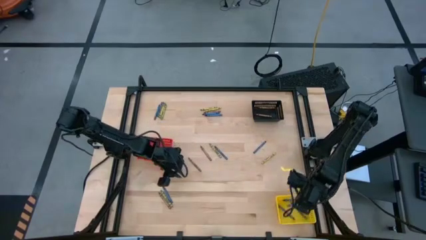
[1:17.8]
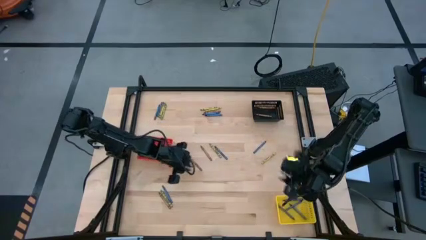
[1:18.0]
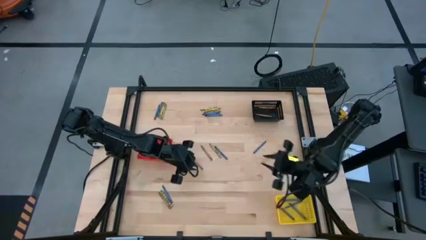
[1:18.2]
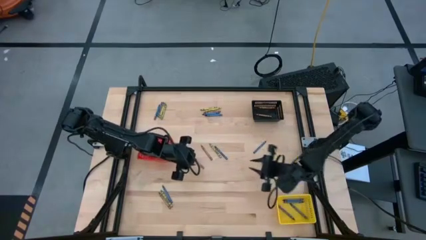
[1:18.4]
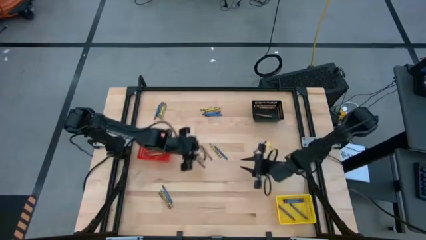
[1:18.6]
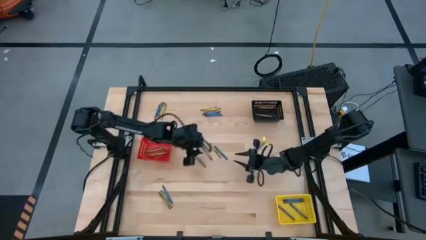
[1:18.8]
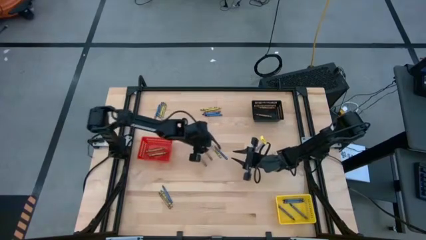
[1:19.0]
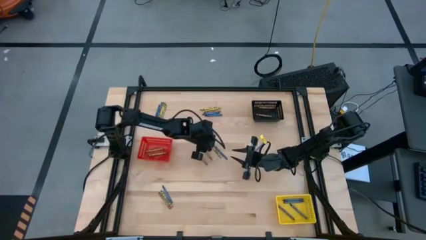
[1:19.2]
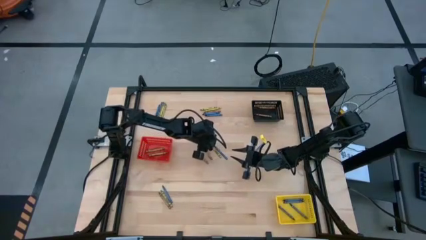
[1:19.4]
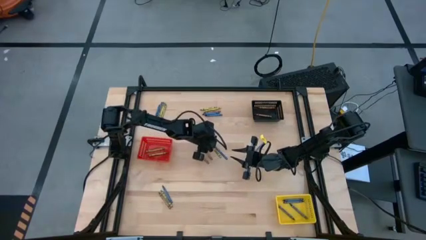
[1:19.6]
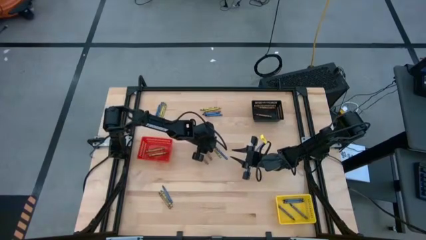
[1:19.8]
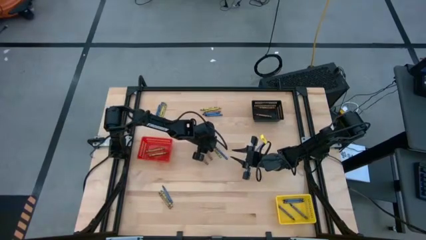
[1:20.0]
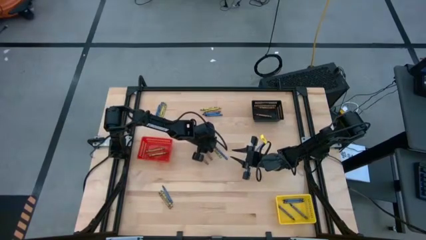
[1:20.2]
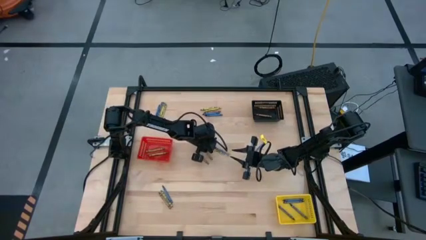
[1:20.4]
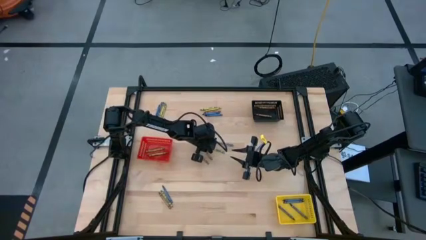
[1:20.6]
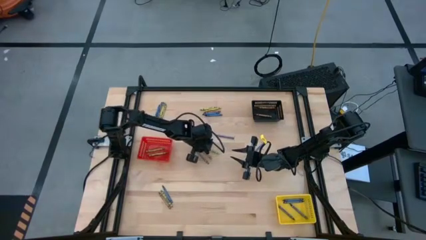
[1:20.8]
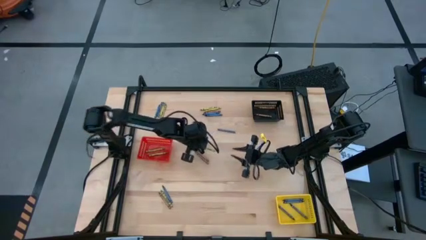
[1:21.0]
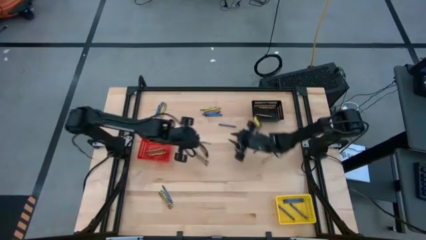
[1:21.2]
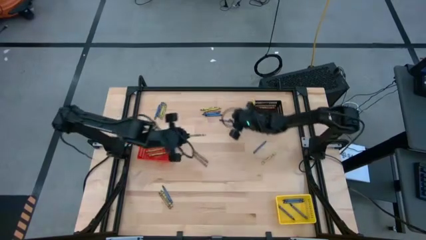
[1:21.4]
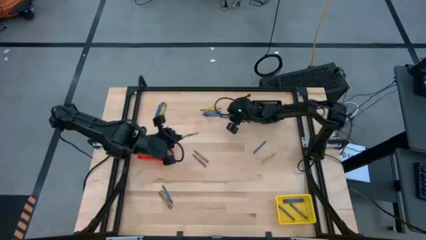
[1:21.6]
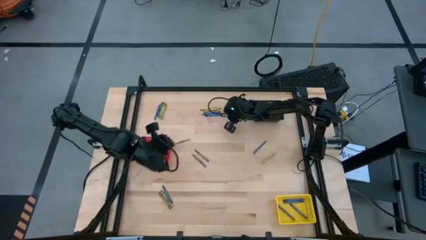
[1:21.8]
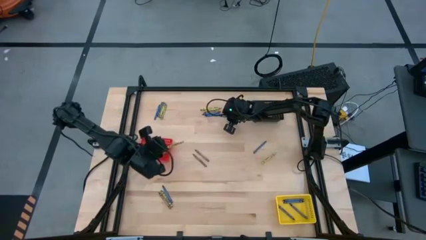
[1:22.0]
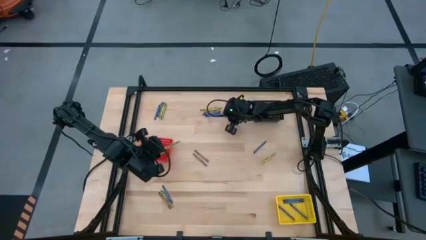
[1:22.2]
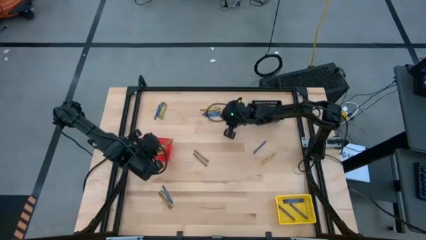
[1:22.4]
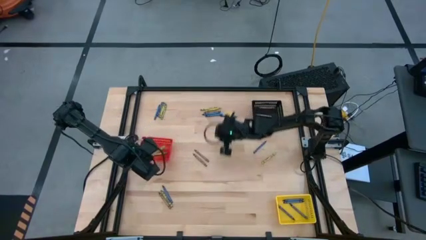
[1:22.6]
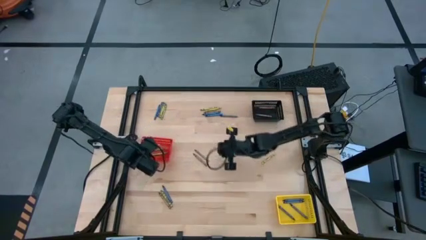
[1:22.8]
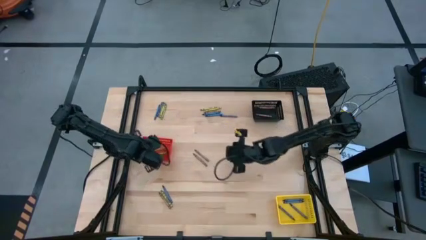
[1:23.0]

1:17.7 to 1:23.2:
Task: Sort crayons
Put the green crayon into the red bin

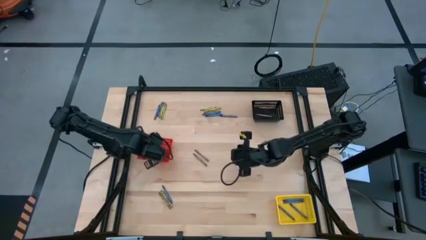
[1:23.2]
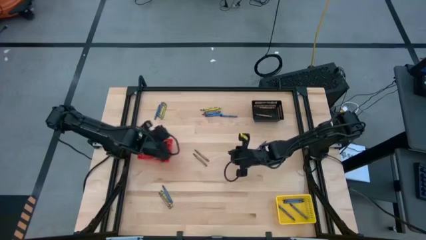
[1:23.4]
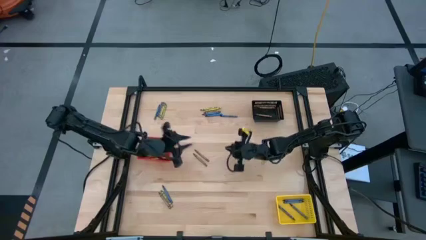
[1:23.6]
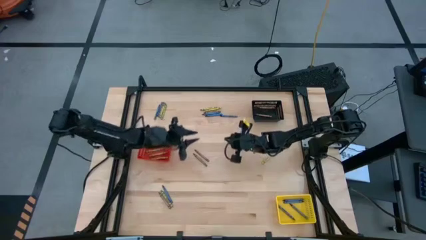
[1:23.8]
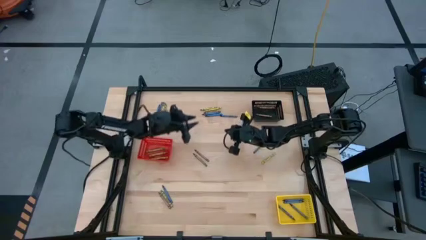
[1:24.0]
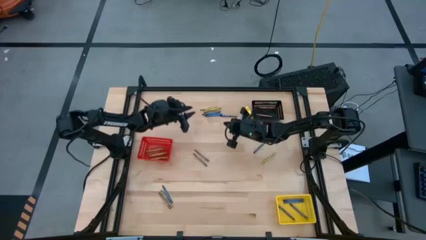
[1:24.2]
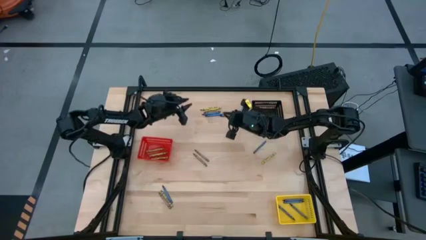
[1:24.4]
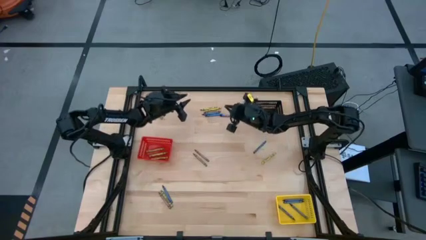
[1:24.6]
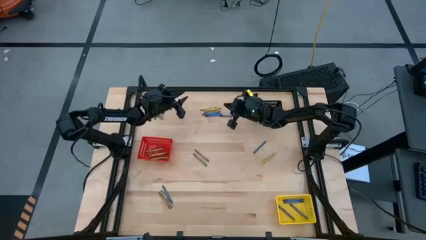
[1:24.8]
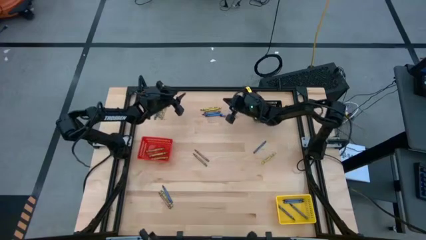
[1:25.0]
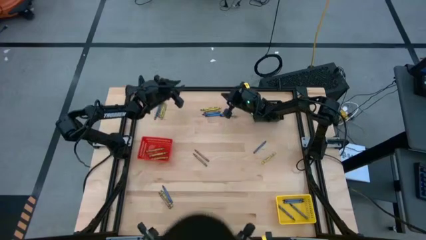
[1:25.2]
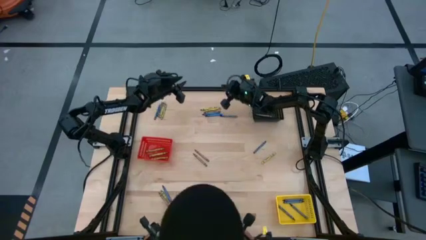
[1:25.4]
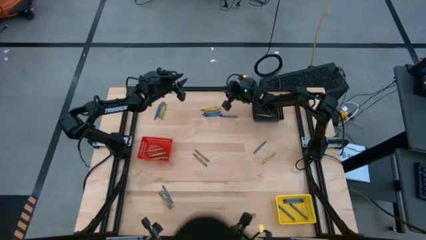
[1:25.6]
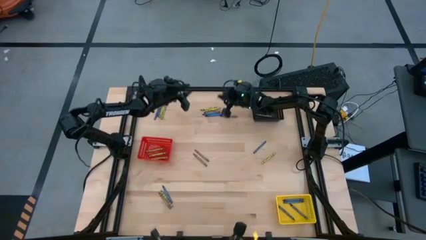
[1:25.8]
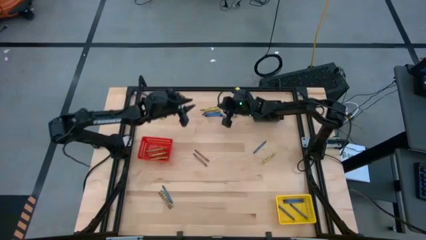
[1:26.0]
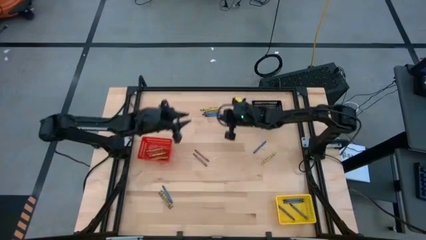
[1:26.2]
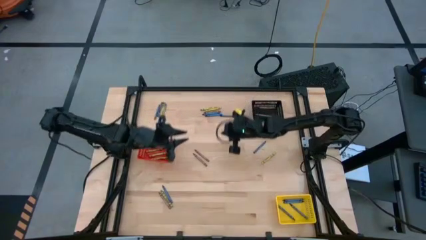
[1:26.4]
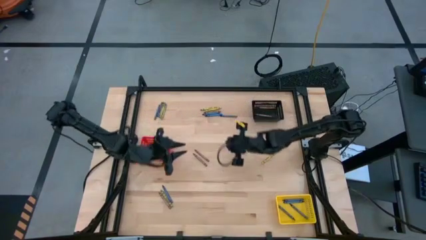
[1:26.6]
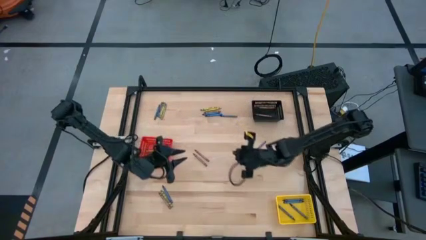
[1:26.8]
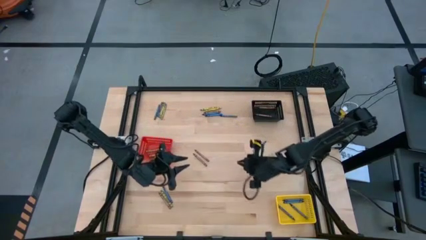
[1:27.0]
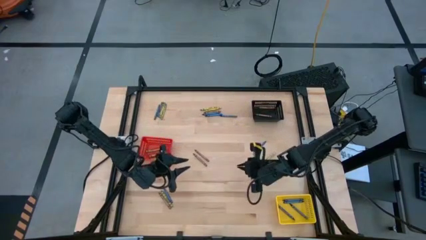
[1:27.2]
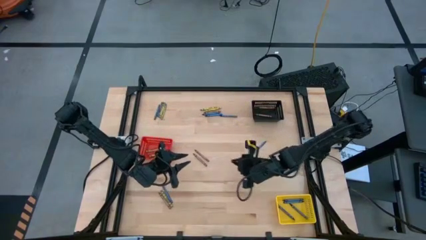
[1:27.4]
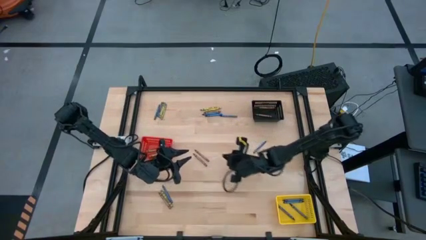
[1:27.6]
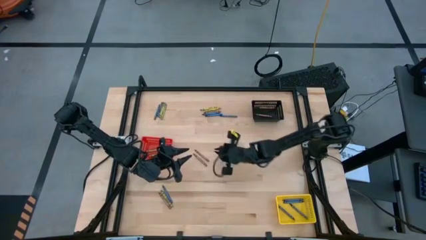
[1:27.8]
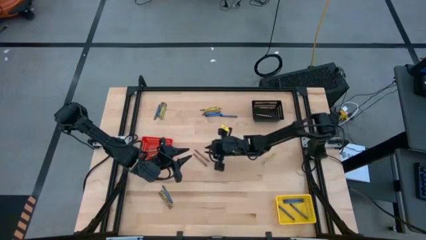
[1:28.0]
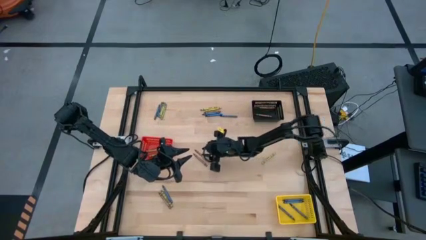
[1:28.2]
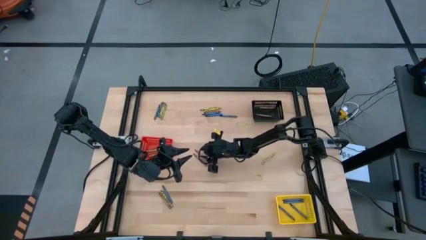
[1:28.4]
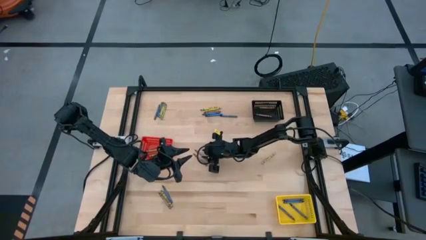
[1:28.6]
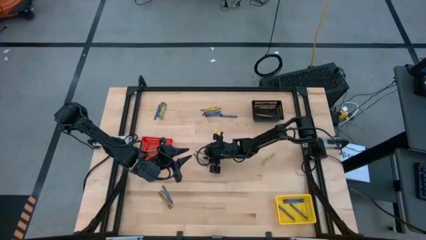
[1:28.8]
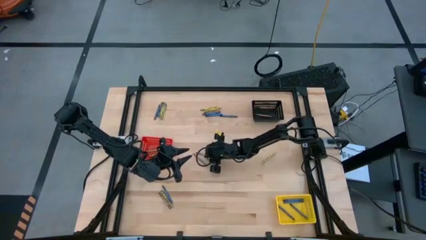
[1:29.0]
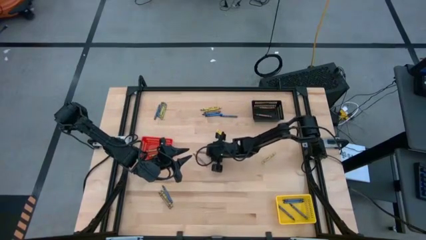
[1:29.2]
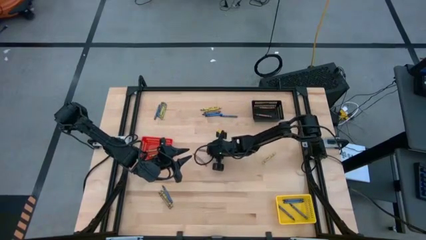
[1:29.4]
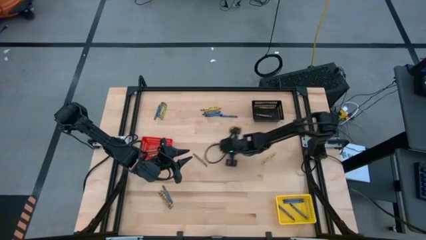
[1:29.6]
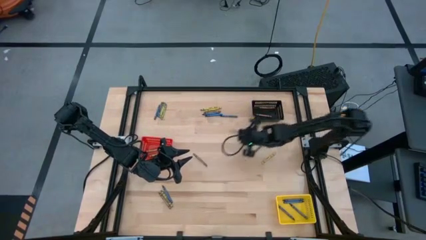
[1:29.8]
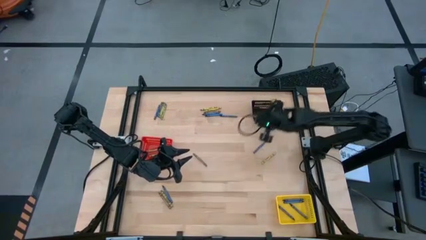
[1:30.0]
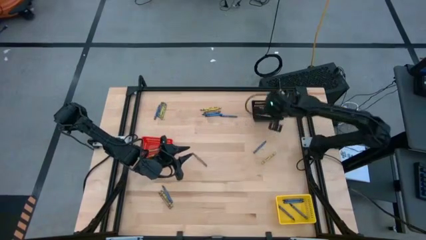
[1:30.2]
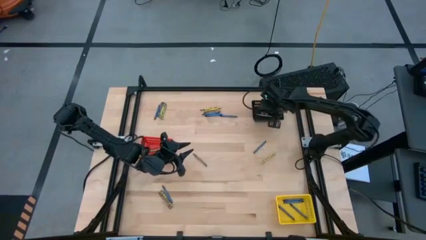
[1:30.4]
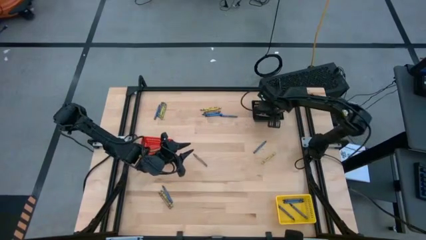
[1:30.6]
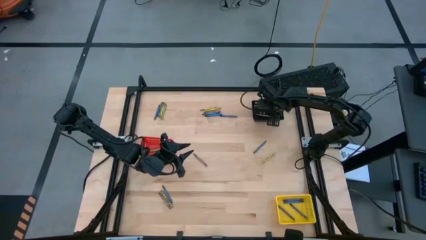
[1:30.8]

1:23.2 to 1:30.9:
Put the brown crayon into the black bin

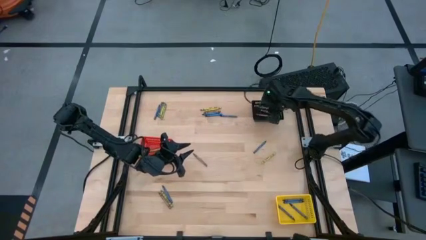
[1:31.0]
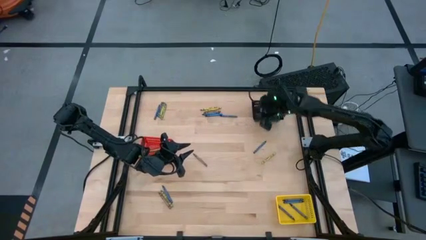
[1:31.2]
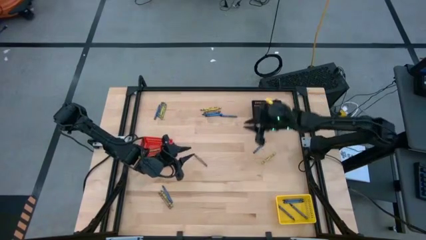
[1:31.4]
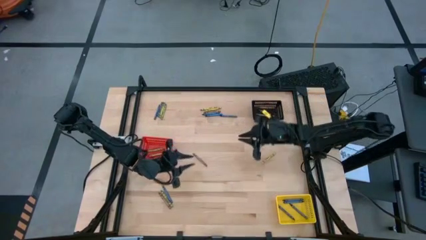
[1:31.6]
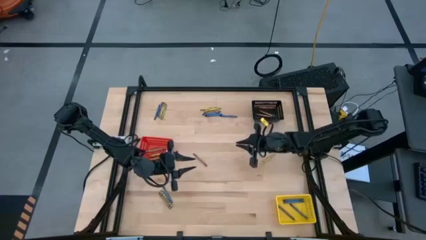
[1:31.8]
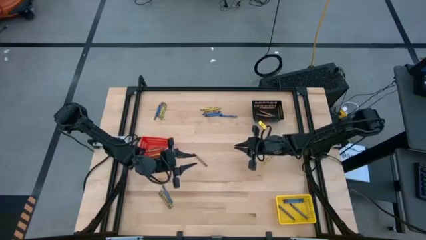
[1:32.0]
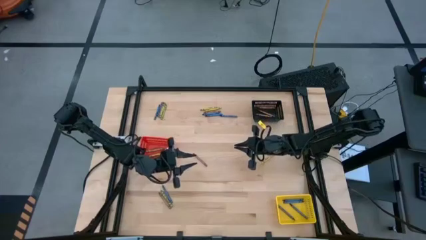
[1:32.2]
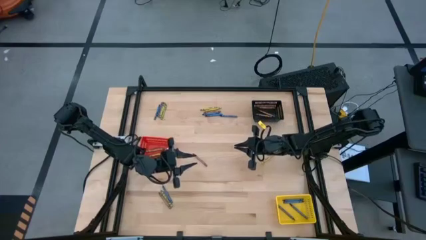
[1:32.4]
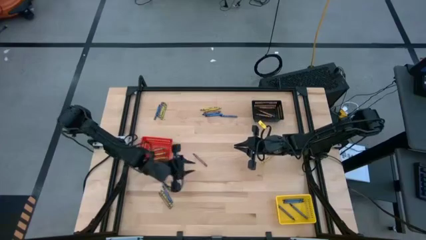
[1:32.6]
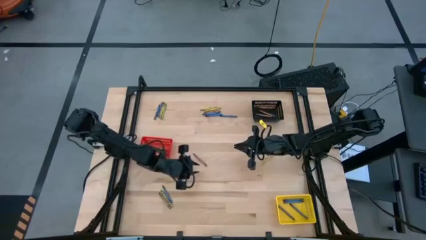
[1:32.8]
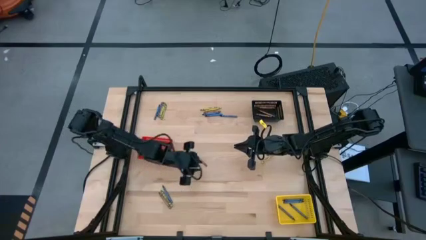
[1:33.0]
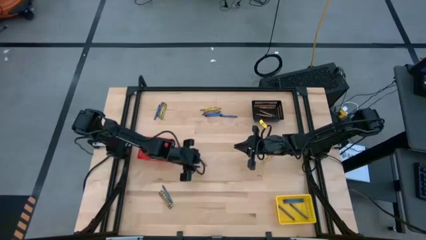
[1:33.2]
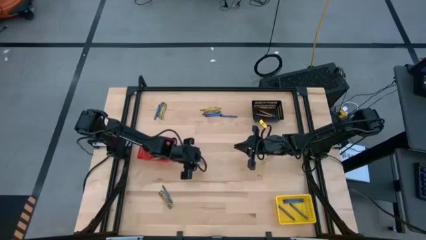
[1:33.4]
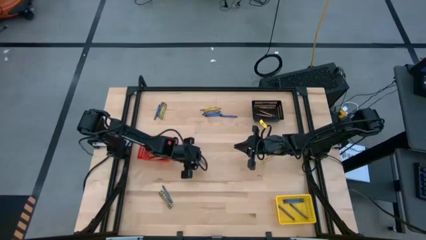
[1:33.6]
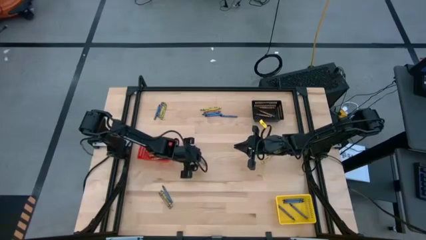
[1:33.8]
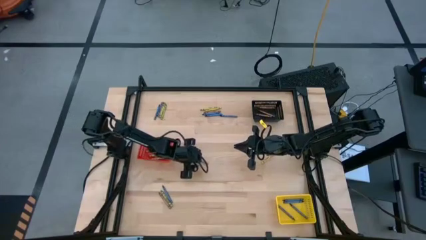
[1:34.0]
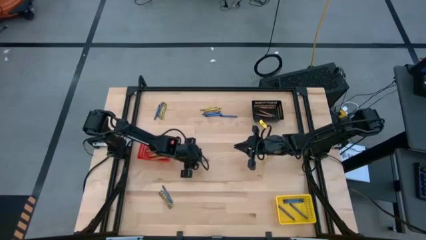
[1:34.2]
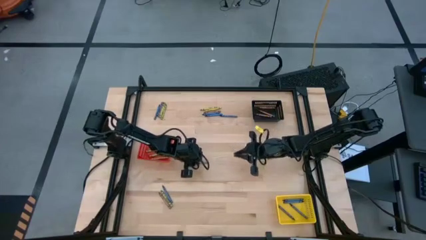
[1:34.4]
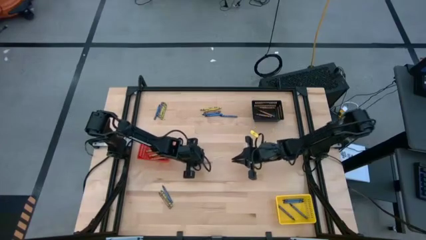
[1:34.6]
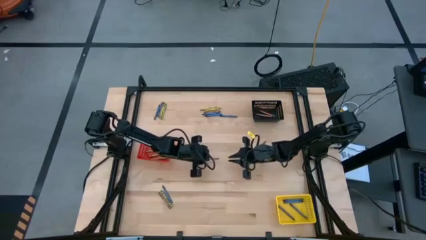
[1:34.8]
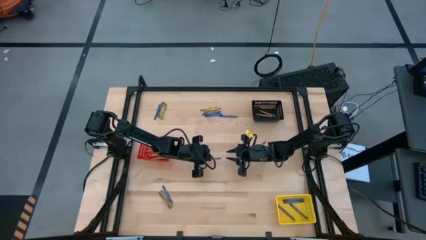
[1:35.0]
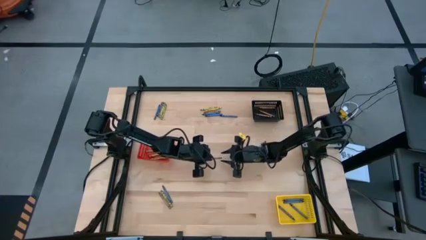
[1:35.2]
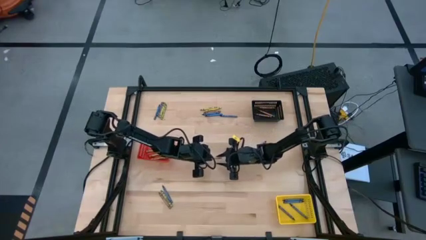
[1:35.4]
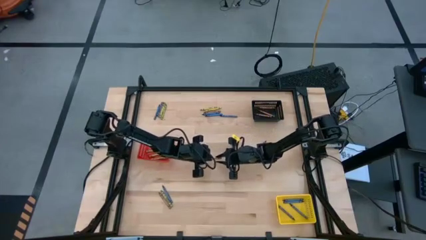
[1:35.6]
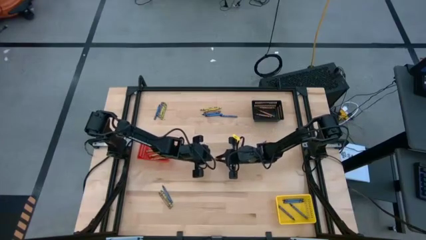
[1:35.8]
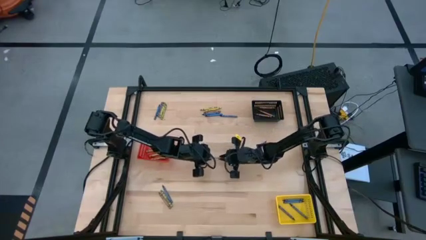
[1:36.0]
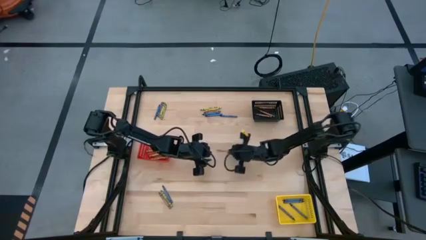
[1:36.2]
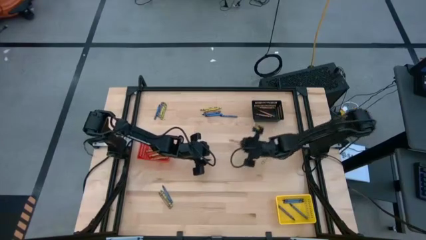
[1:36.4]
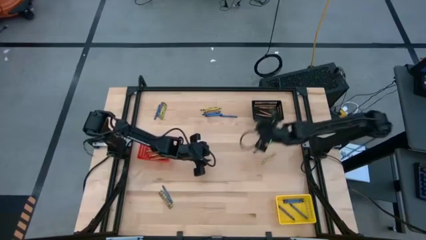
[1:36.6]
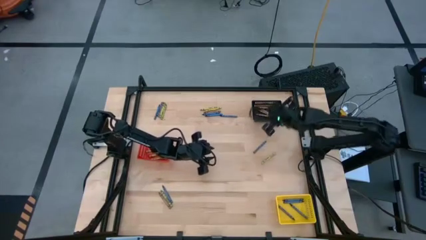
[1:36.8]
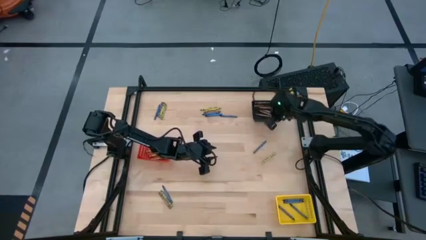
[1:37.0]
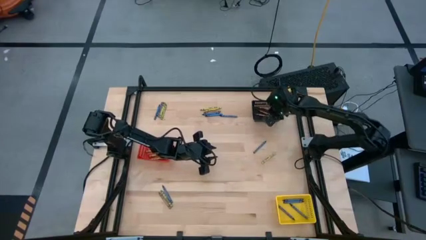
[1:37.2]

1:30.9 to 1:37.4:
Put the brown crayon into the black bin
